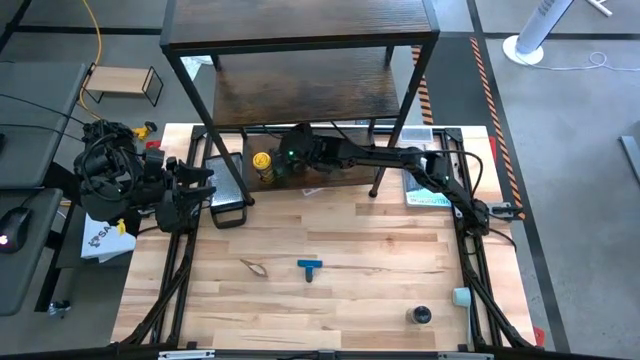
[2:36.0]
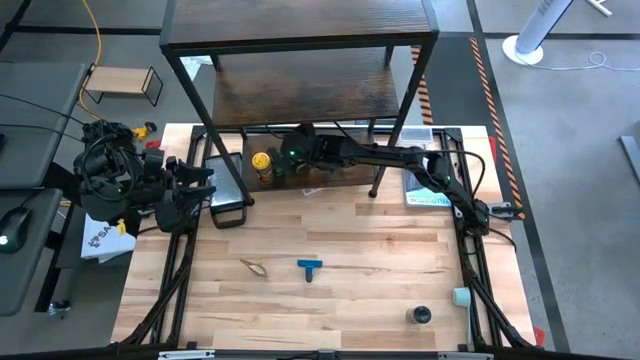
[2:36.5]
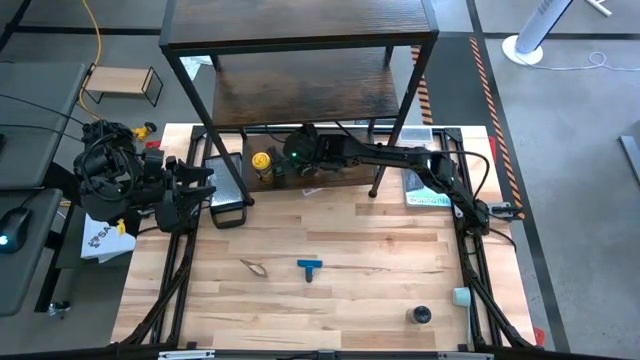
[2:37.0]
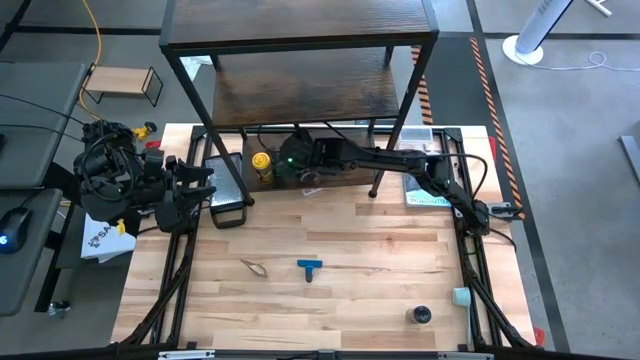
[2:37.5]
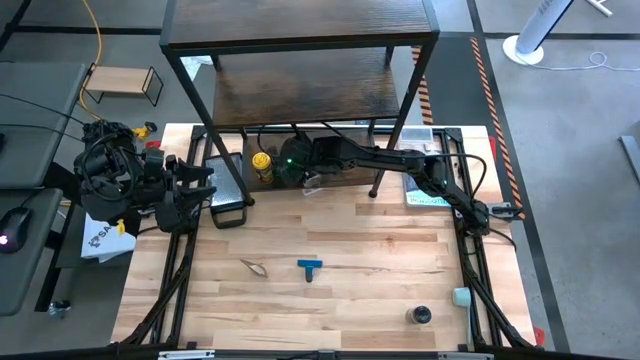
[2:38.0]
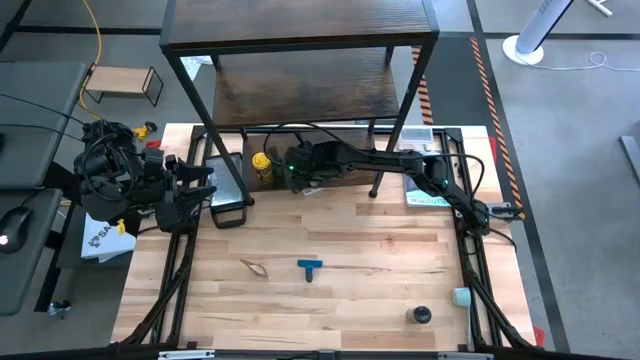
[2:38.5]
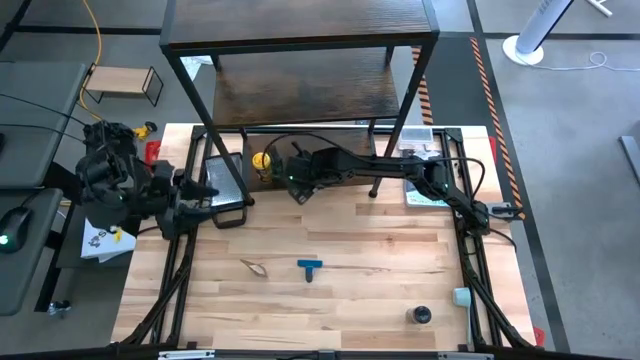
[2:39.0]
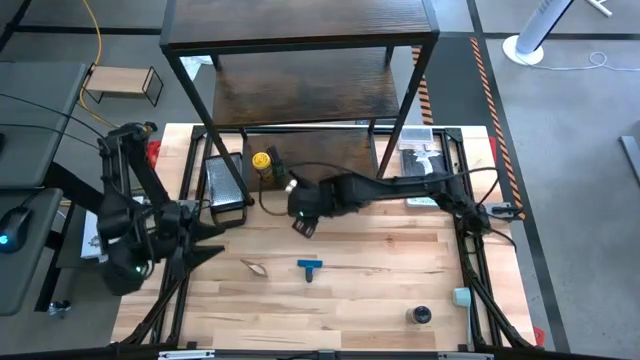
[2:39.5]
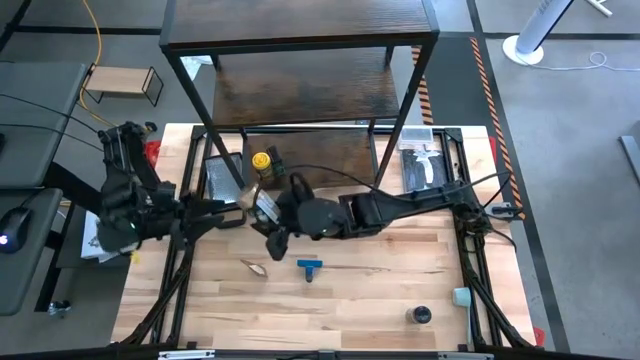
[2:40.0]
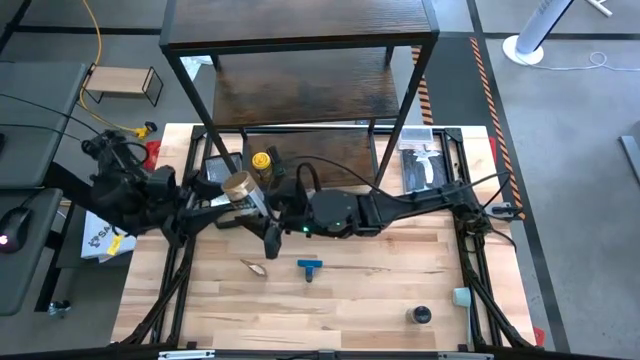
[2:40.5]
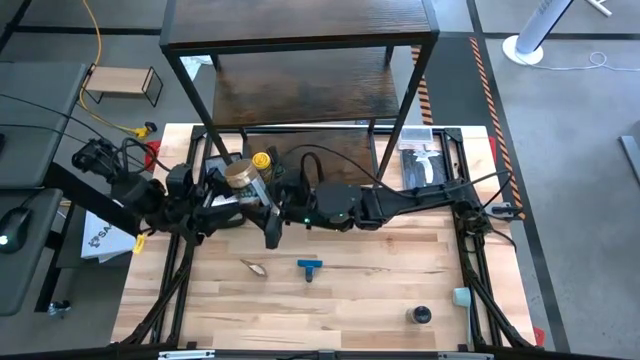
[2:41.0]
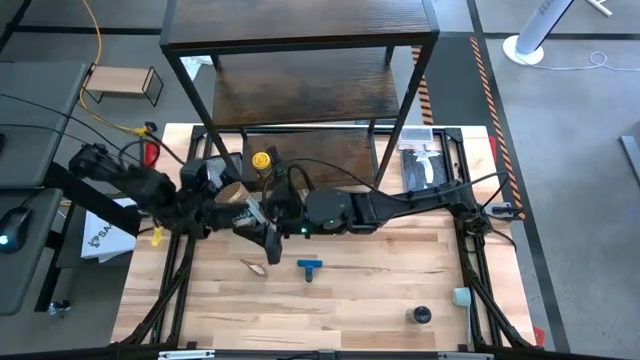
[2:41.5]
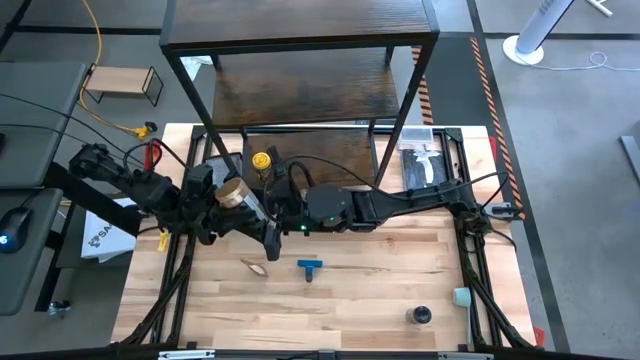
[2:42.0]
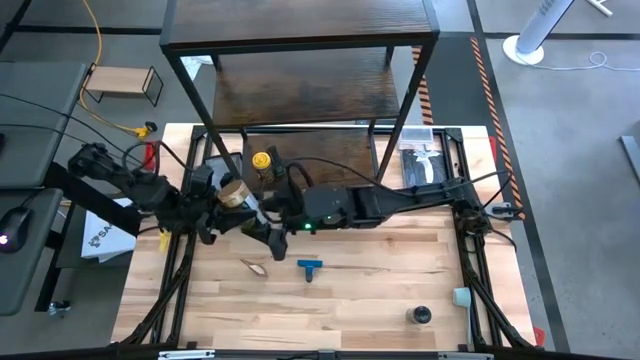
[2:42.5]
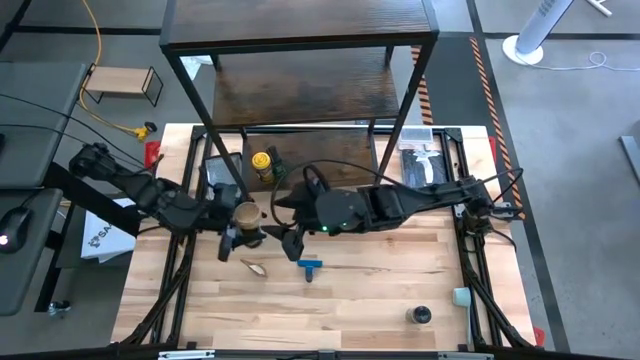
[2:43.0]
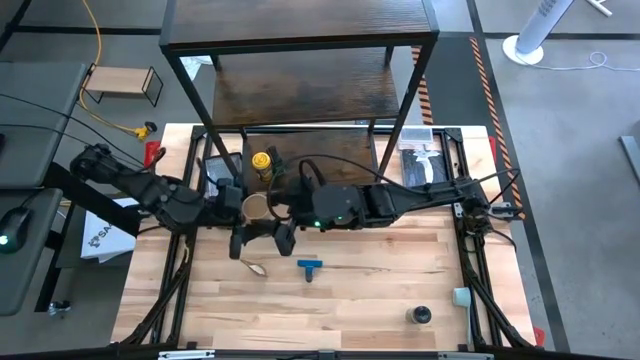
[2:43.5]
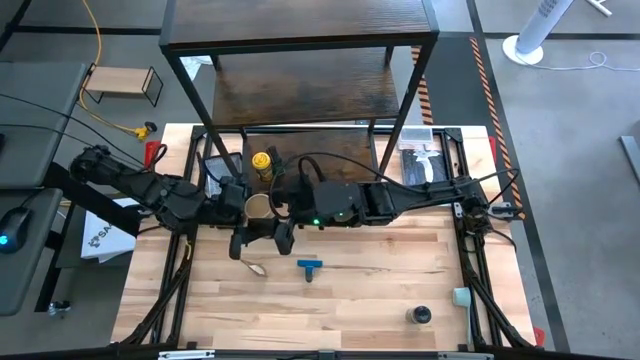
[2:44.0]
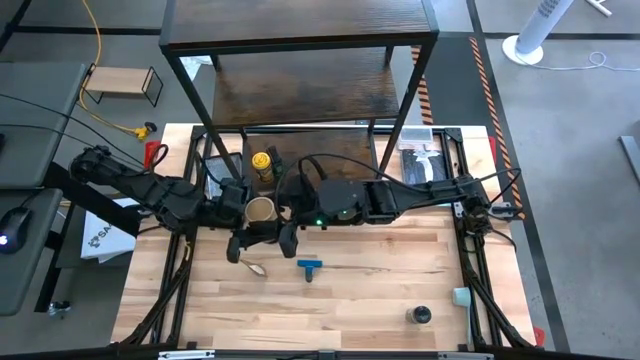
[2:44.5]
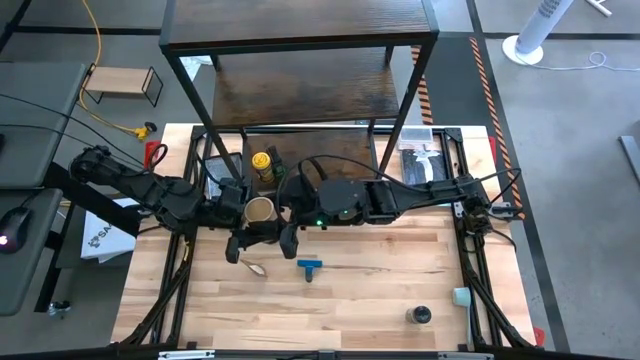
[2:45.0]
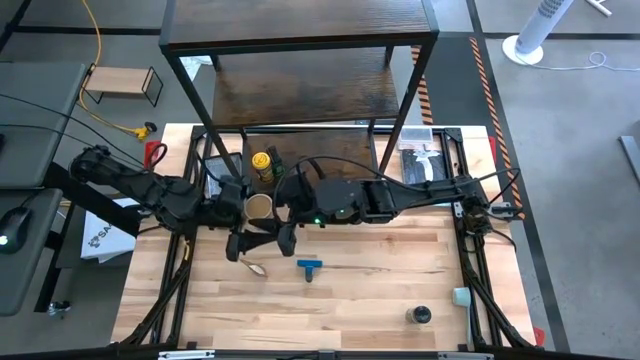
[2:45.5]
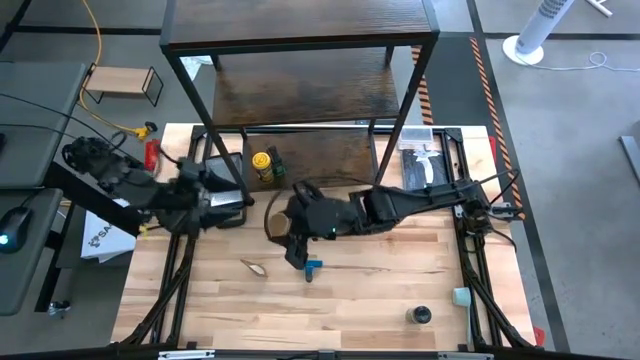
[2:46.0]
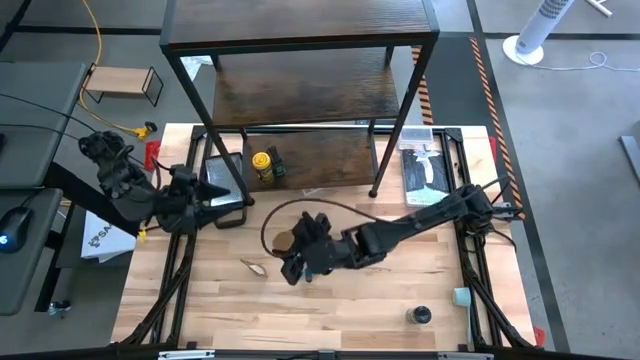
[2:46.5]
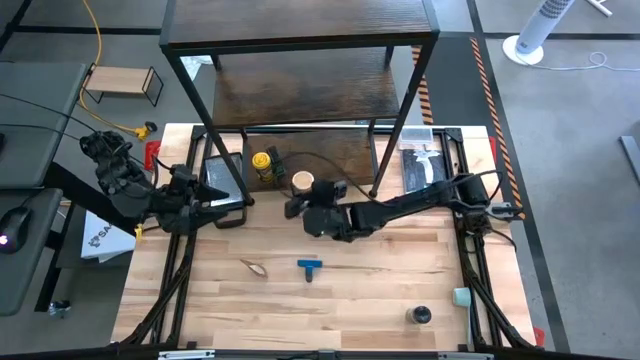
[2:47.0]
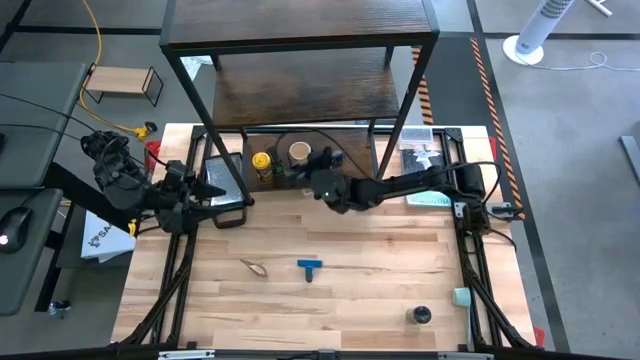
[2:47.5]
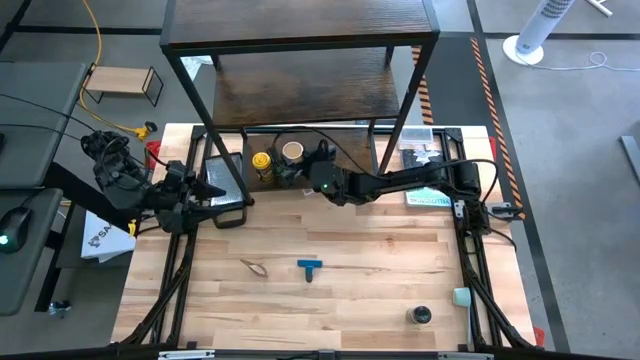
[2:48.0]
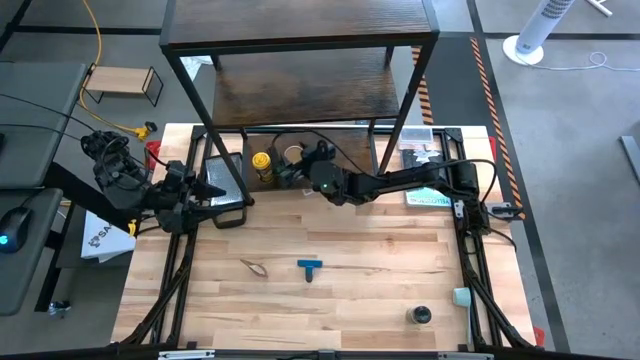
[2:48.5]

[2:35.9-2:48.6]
Task: Shelf spices
Put the brown seasoning bottle on the shelf

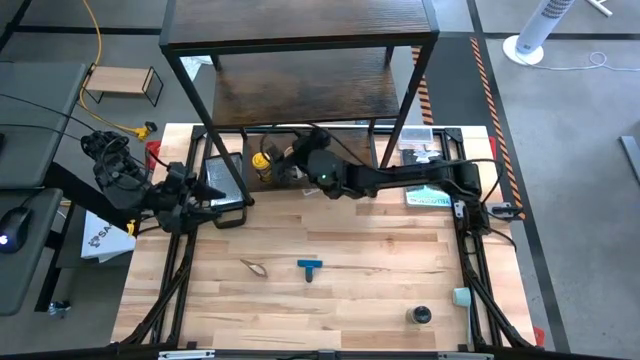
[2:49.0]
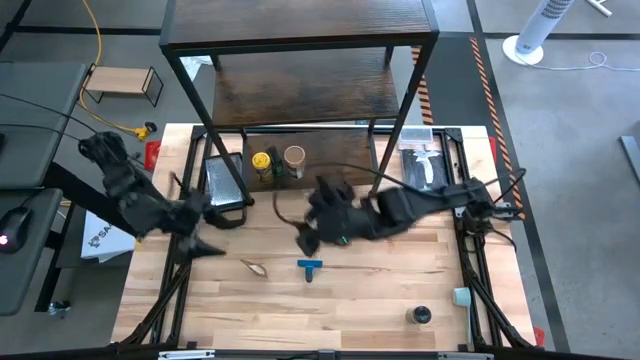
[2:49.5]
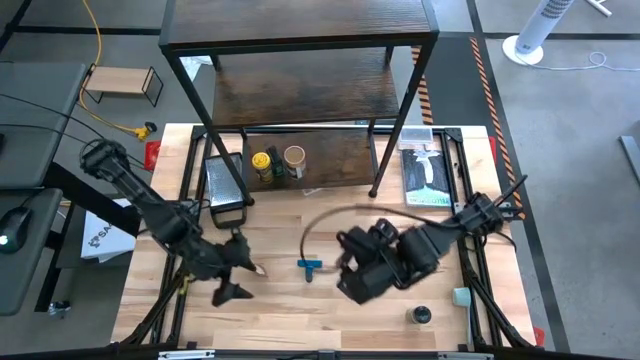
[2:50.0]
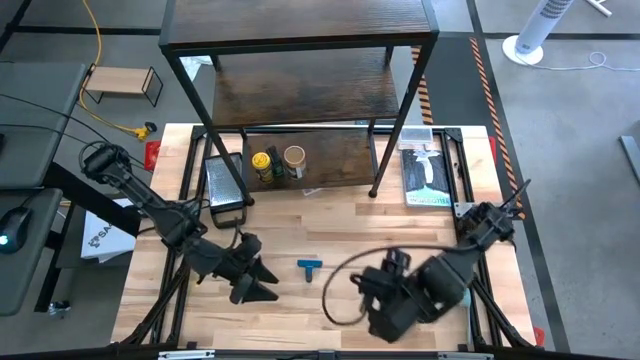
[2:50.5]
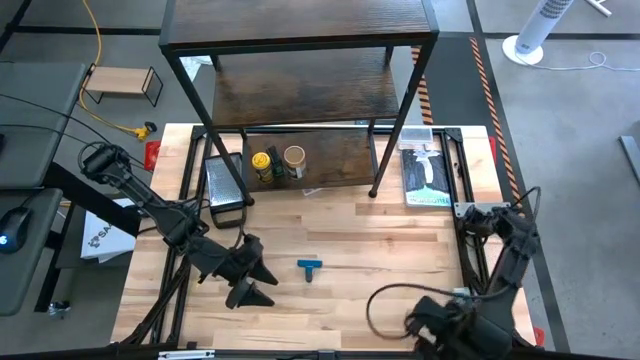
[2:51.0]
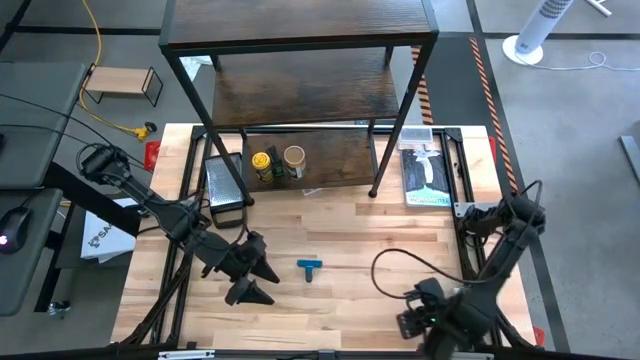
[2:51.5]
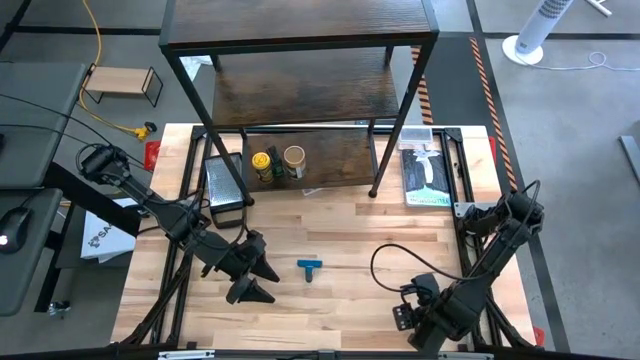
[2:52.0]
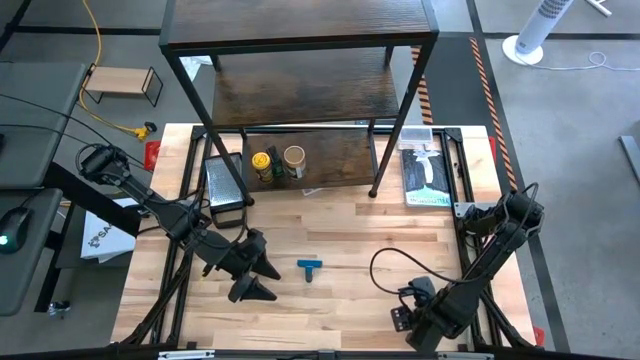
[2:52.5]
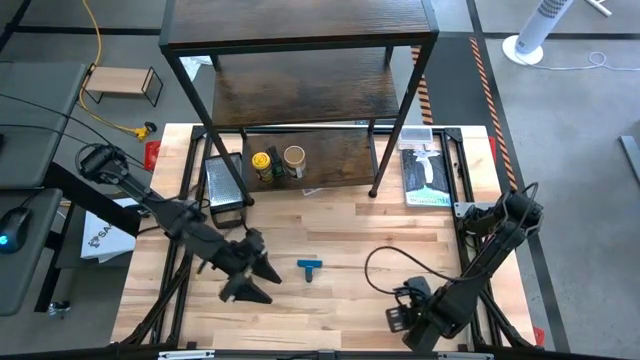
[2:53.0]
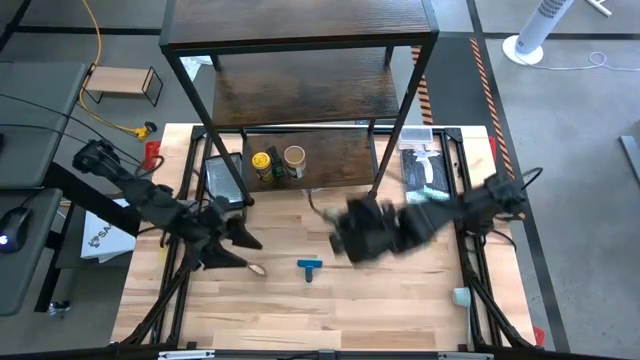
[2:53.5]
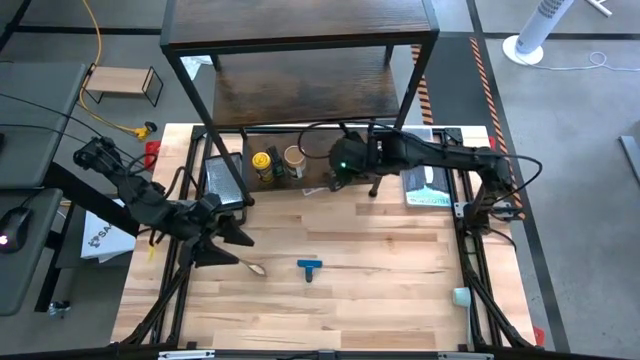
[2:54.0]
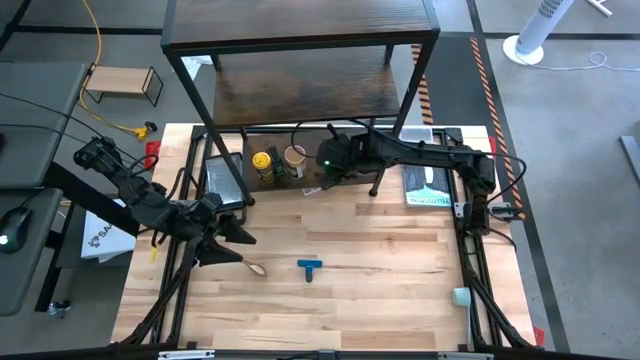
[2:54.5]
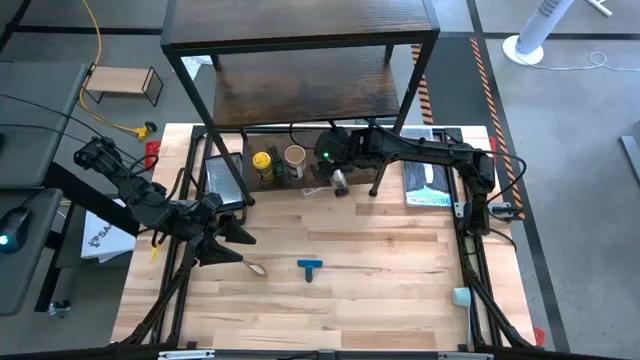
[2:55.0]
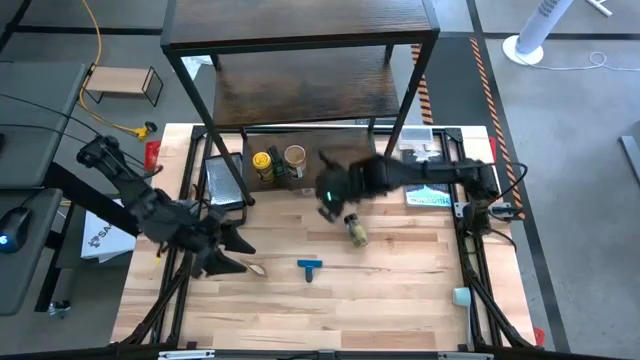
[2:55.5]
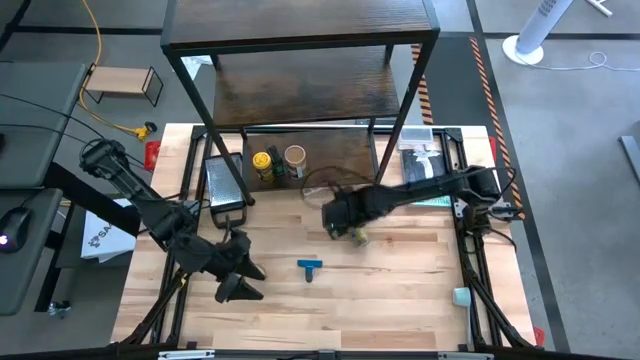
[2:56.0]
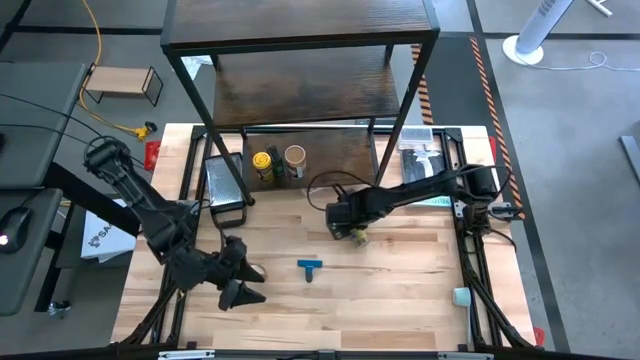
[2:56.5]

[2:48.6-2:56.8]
Put the black seasoning bottle on the shelf

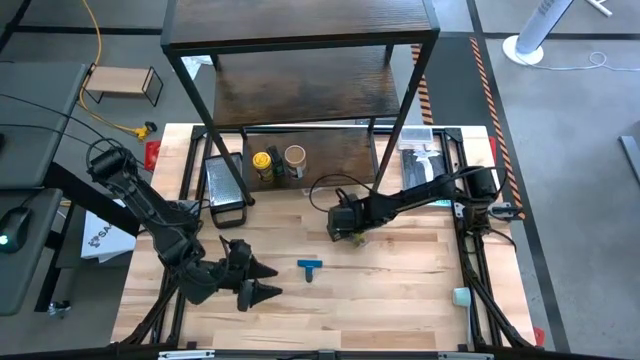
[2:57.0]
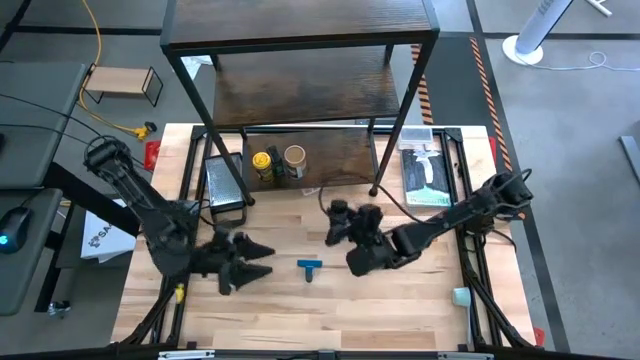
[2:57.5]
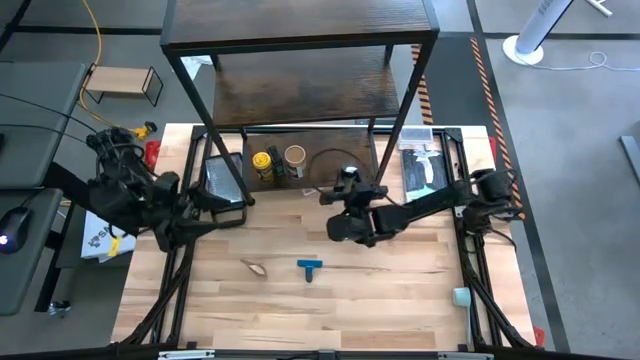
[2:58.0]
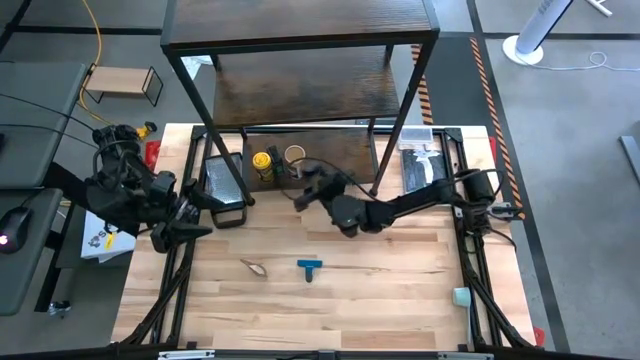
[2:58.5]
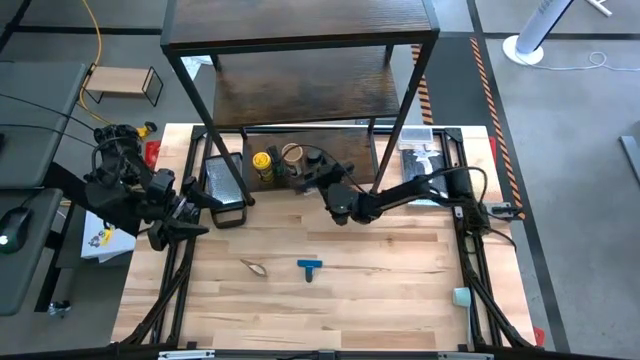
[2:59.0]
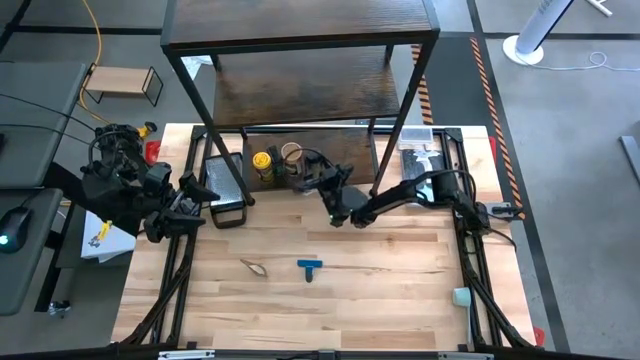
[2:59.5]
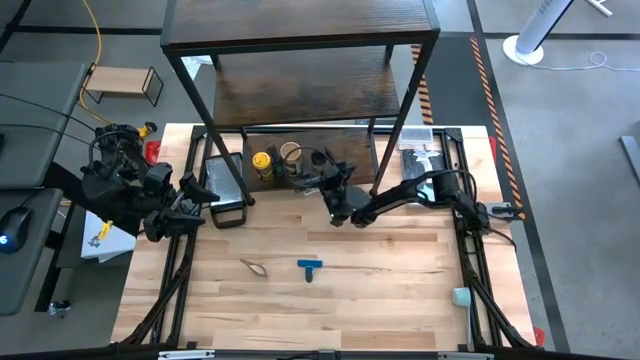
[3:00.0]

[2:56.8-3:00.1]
Put the black seasoning bottle on the shelf
